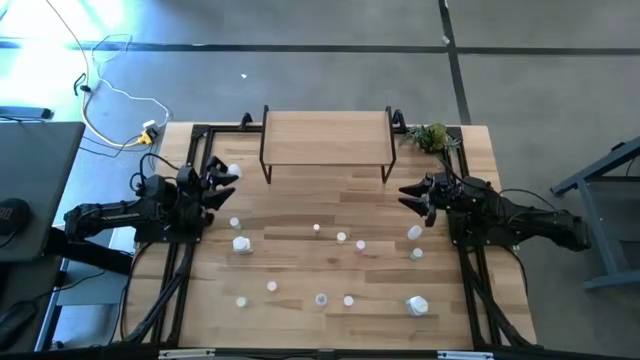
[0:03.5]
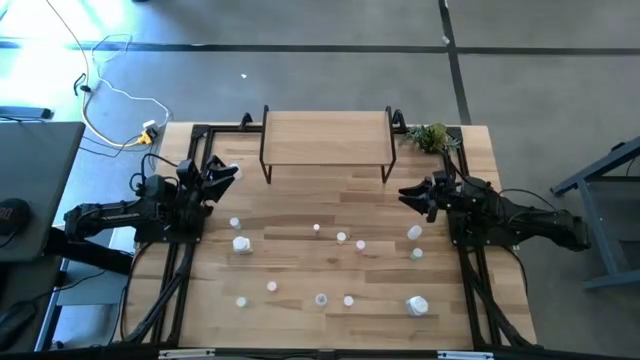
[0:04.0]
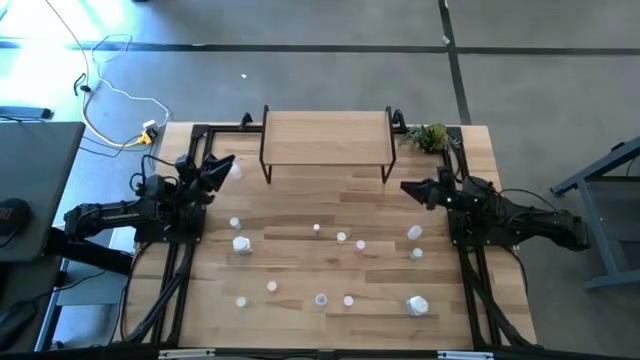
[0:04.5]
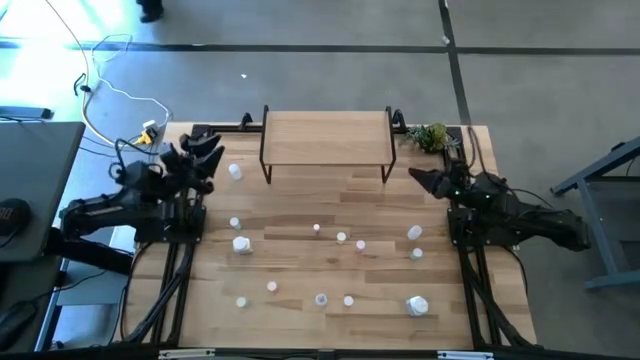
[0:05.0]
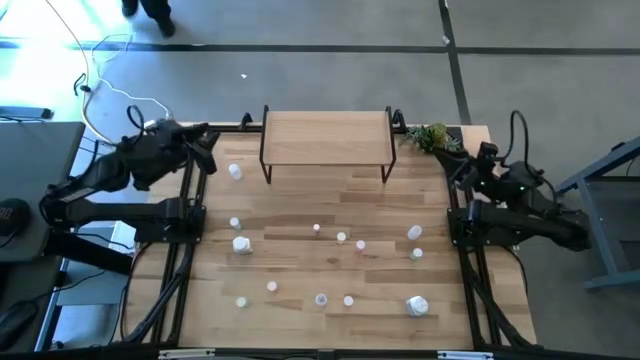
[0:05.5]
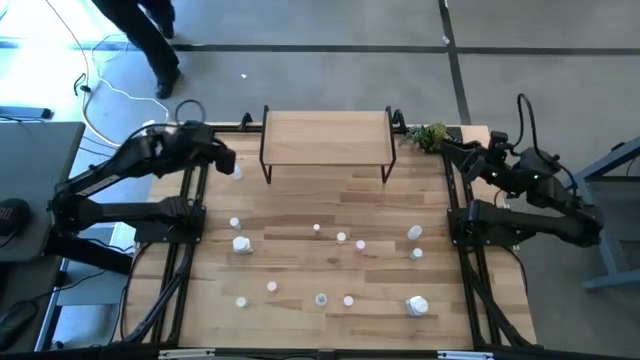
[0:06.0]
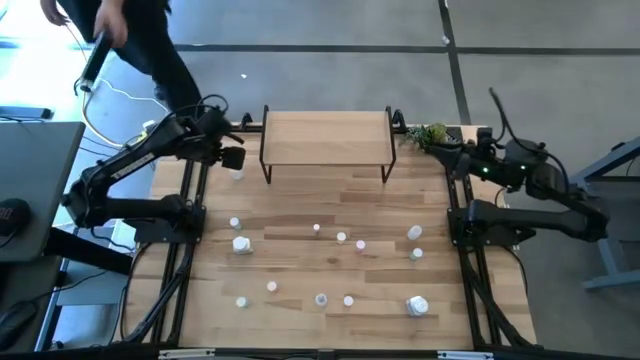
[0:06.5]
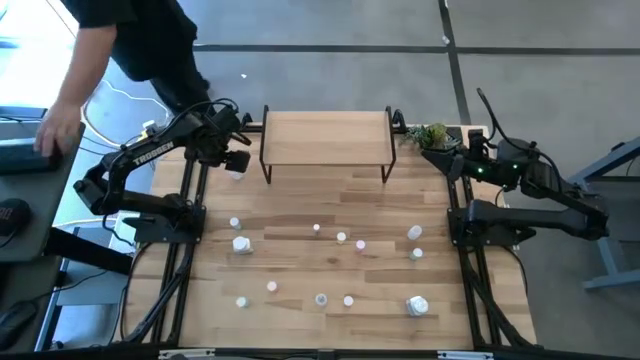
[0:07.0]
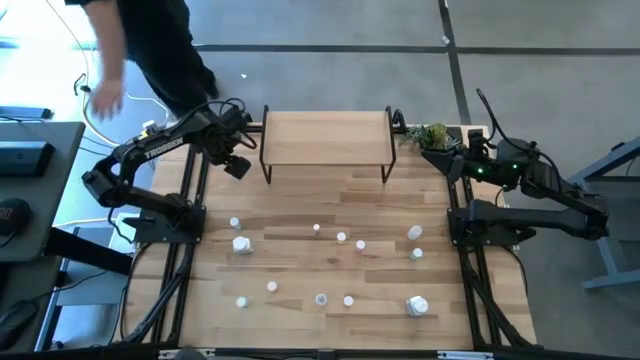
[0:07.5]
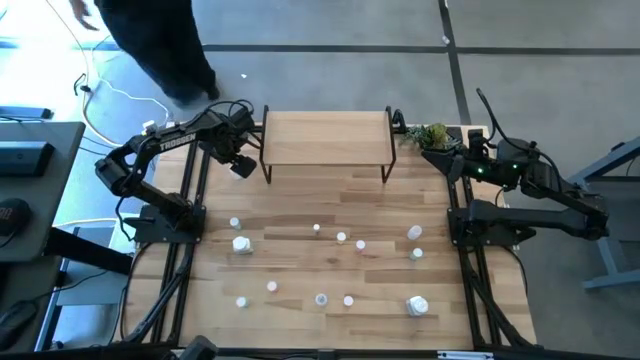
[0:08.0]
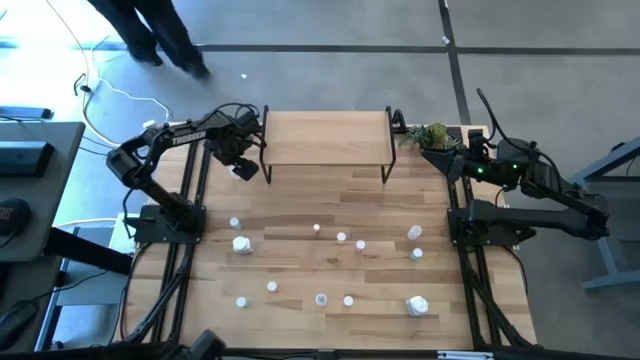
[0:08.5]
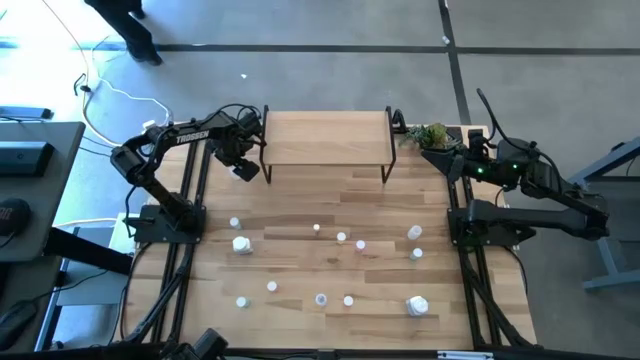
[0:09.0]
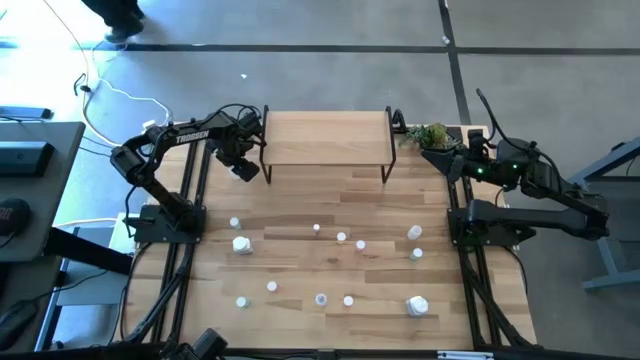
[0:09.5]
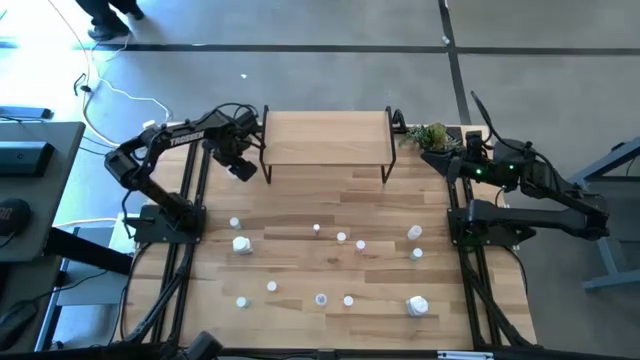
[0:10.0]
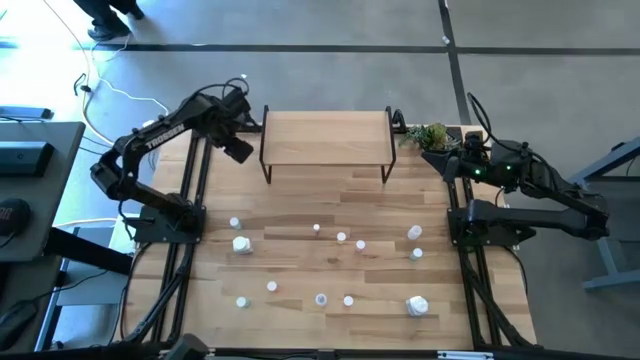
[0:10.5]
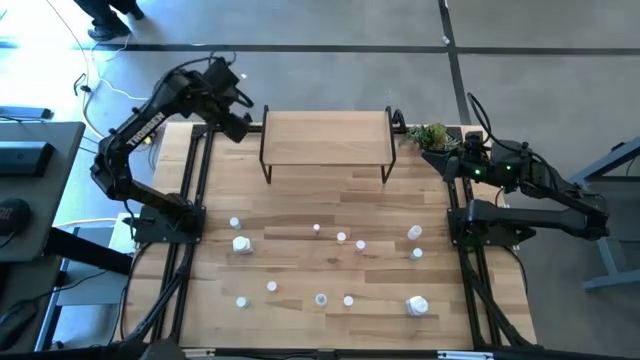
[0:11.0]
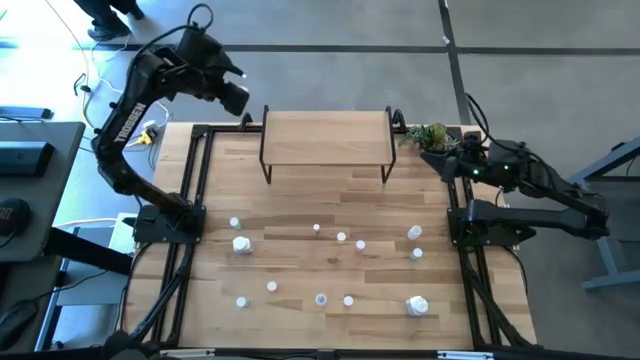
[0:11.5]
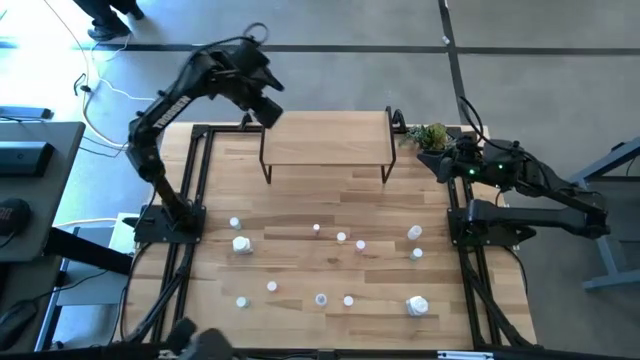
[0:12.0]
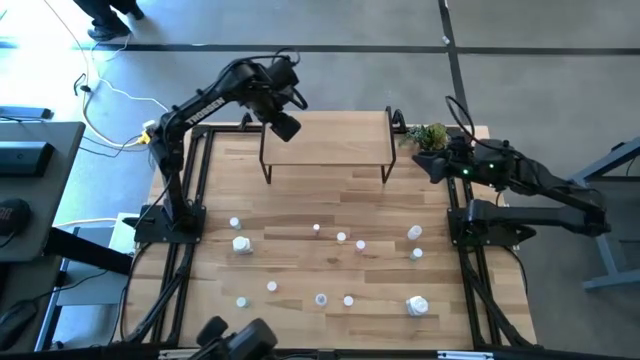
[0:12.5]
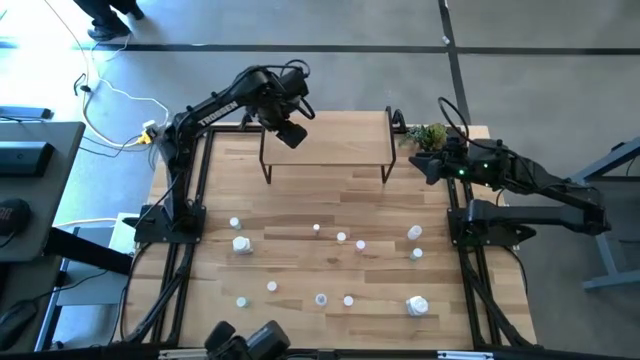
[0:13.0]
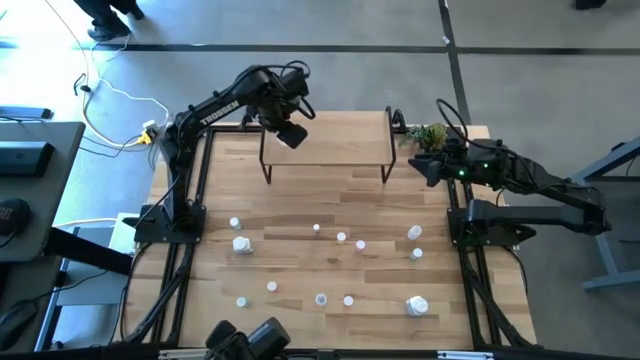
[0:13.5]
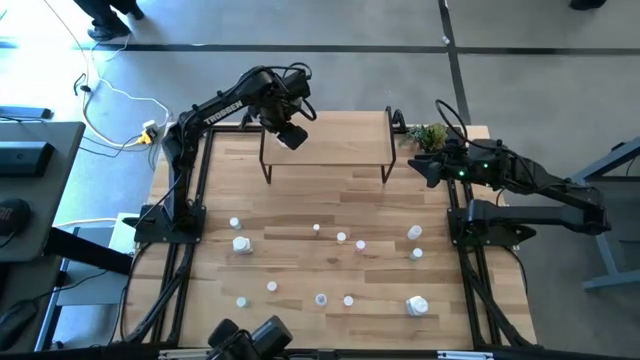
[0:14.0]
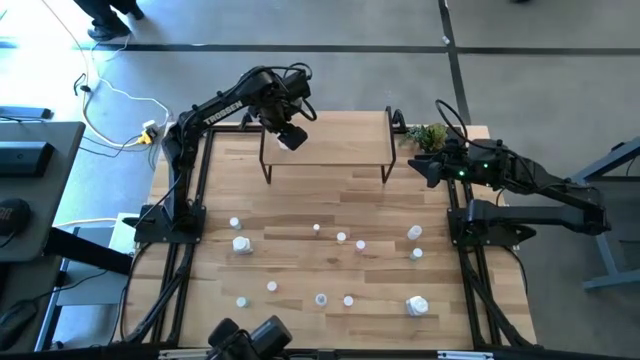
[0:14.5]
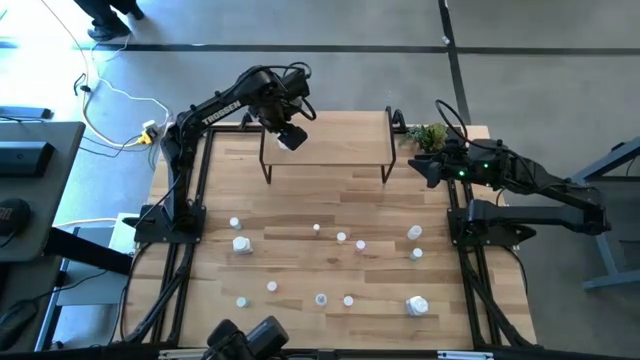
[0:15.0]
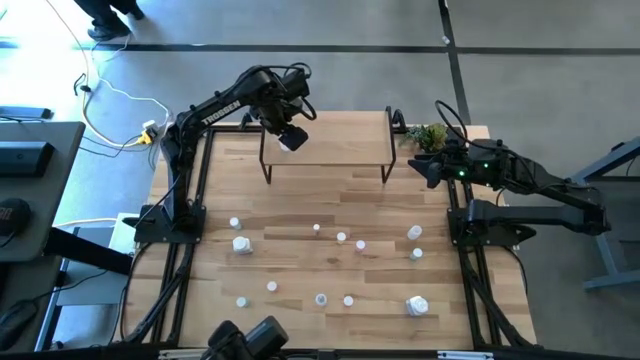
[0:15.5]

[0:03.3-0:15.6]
Task: Pick and place medicine bottles onto shelf by color
Put the top left transparent pill bottle on the shelf

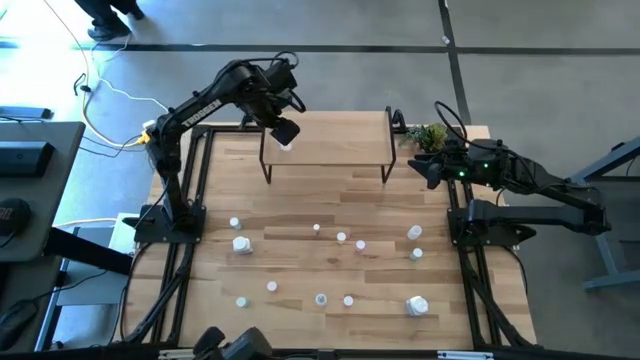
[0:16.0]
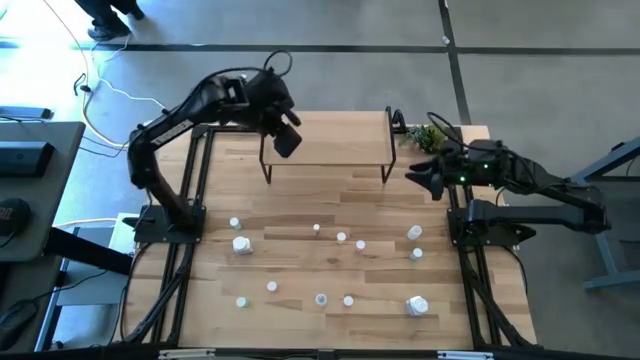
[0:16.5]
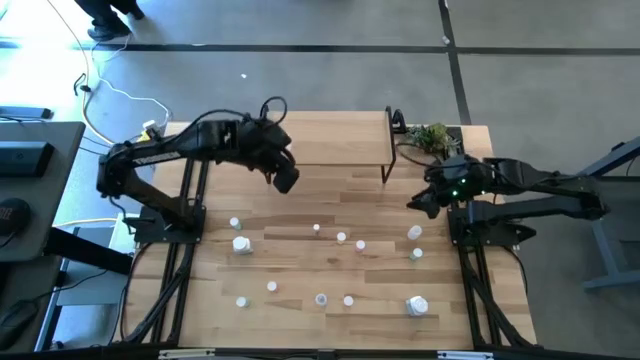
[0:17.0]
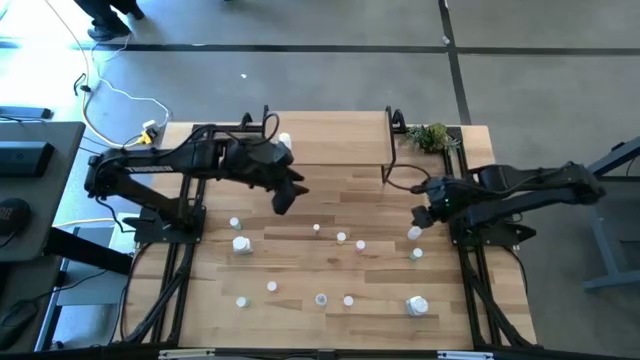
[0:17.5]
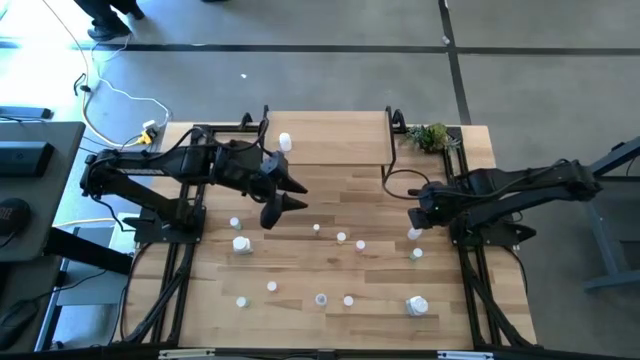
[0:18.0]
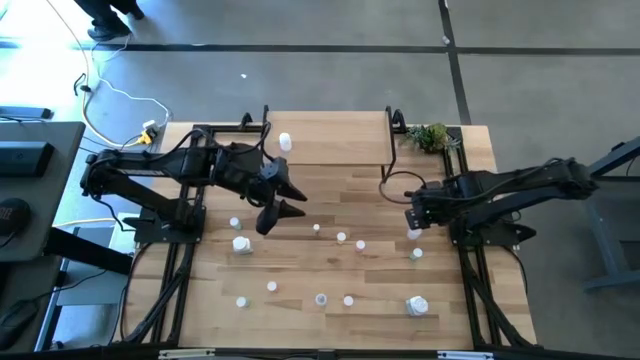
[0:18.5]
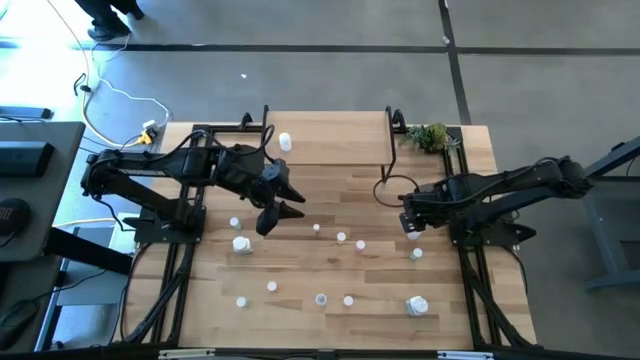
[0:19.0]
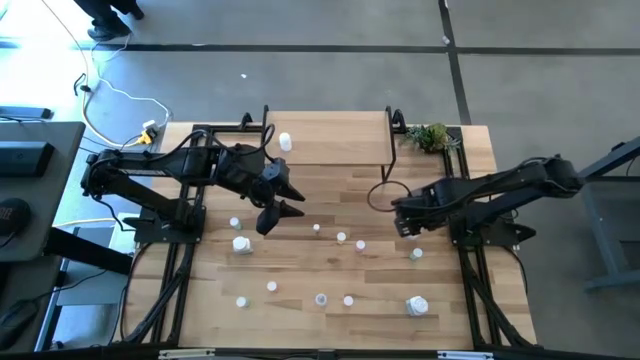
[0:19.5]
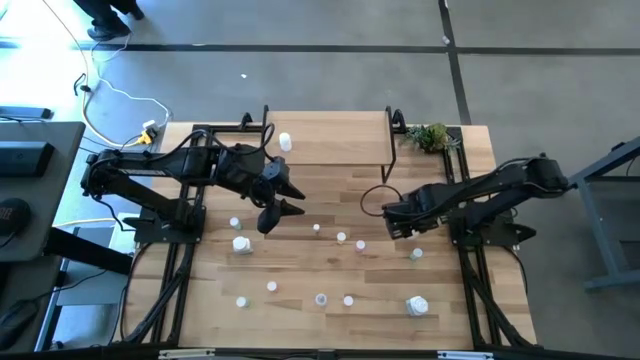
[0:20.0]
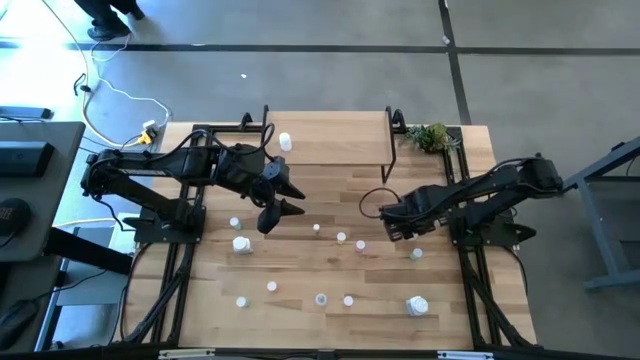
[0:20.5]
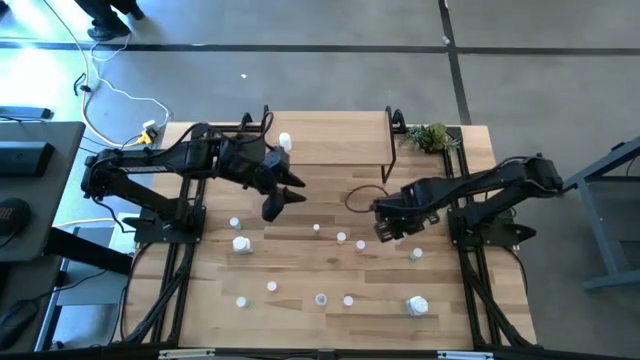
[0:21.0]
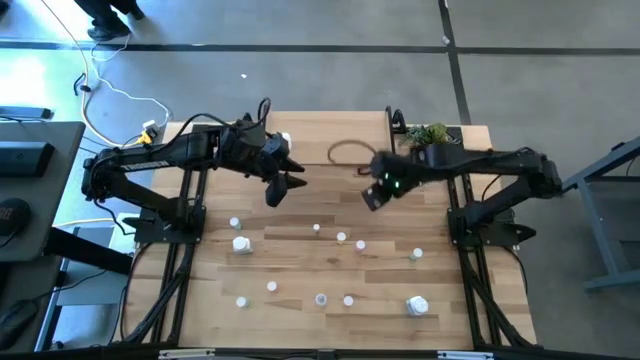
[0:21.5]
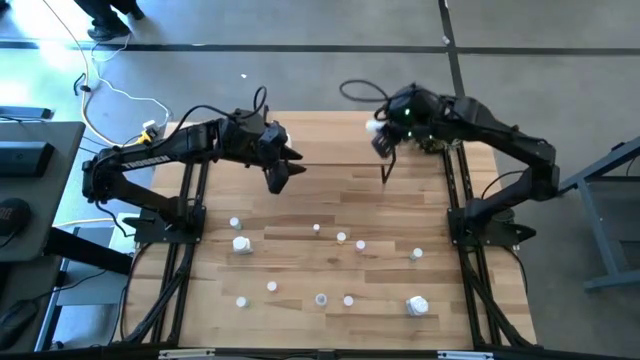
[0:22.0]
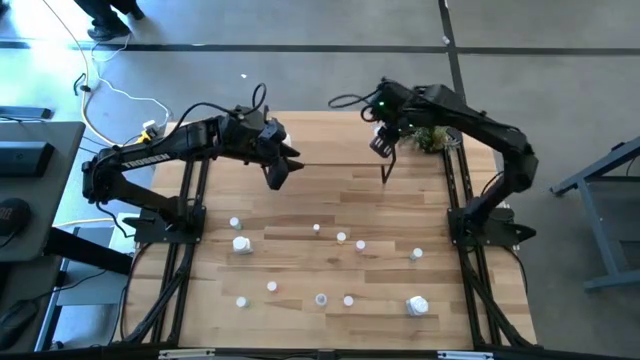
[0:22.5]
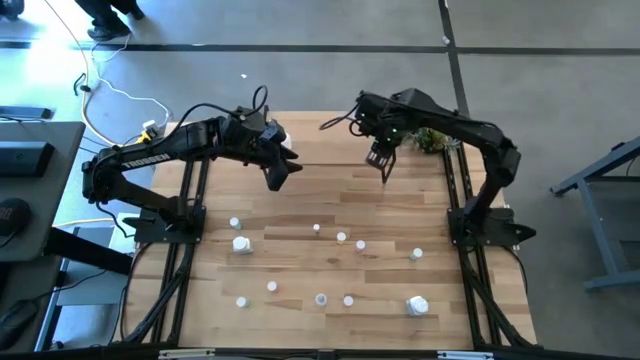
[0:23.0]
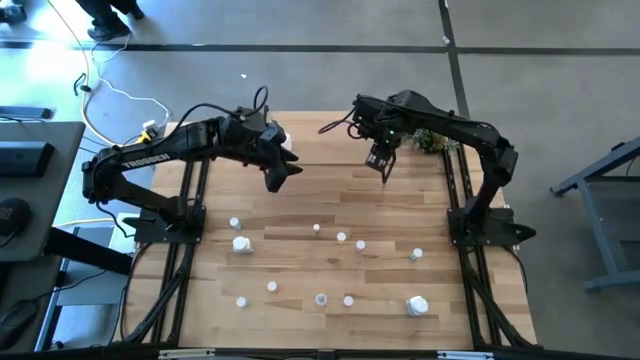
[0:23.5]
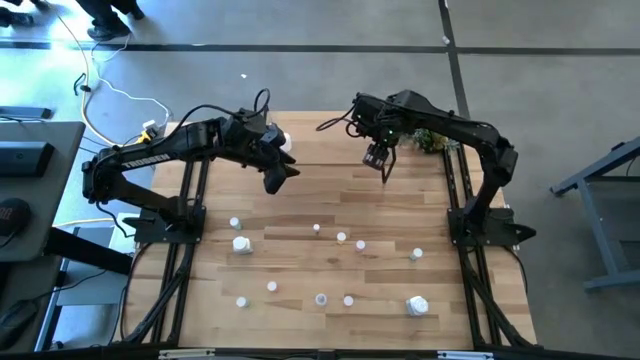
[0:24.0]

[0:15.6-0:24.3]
Put the top transparent pill bottle on the shelf
